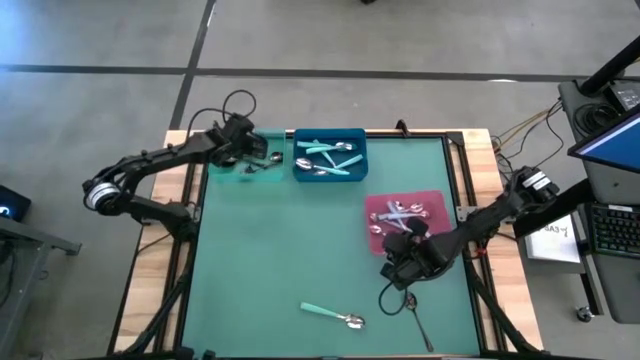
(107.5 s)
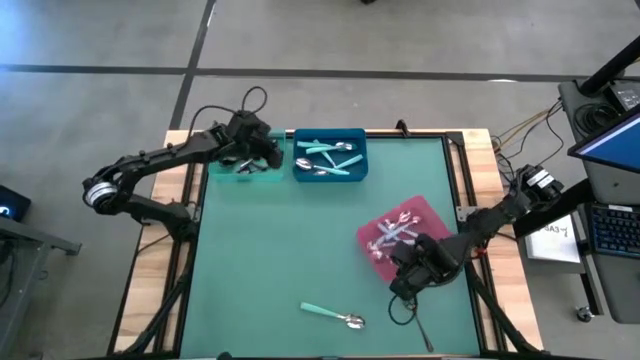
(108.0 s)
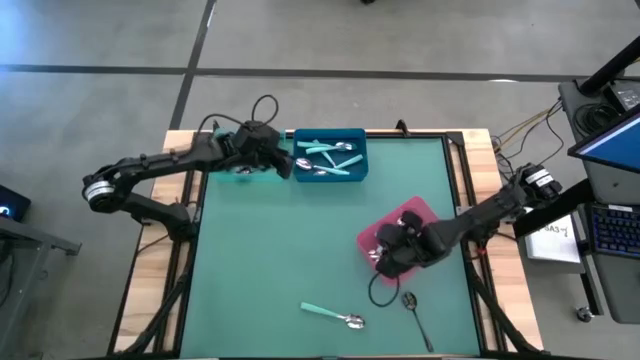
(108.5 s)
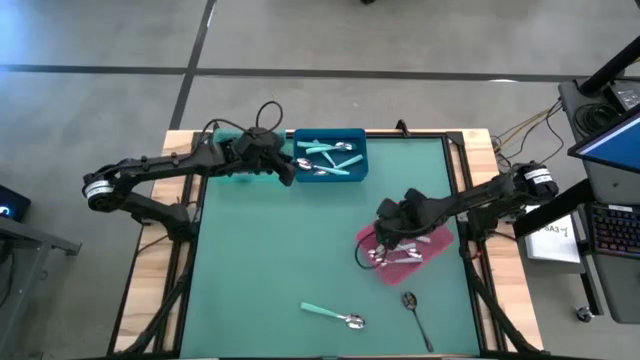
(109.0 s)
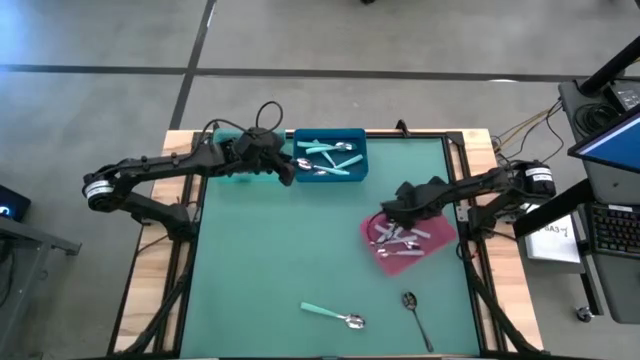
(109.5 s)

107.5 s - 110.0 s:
Task: Sort silverware by color (type)
Adjust the red bin

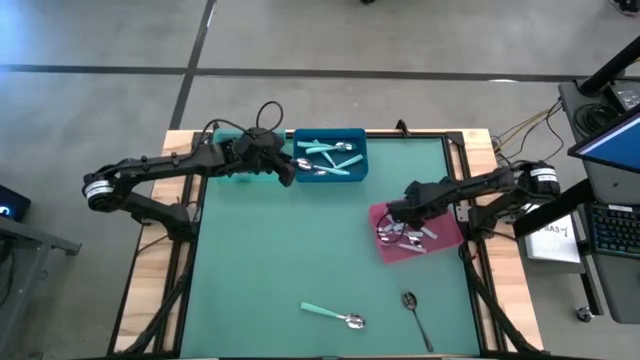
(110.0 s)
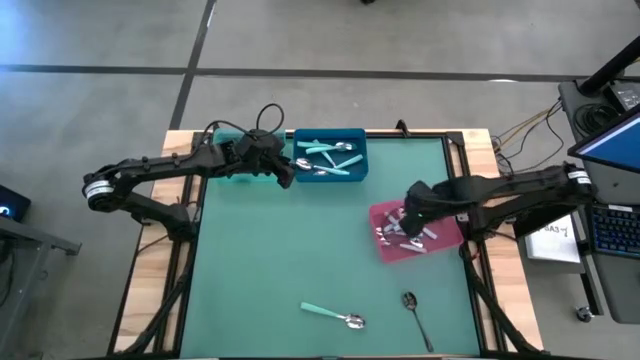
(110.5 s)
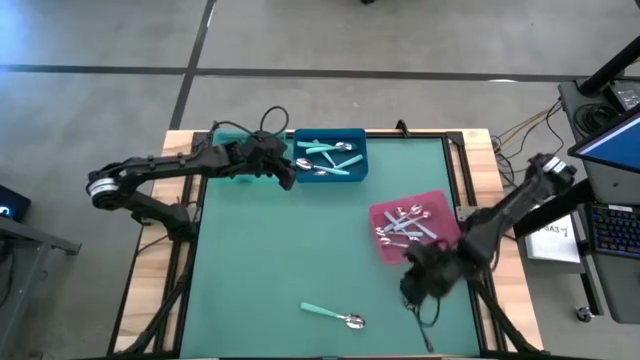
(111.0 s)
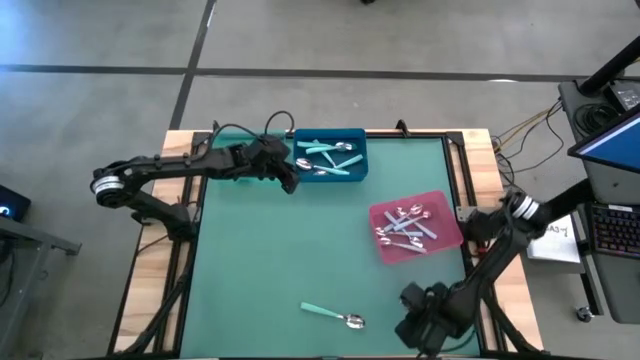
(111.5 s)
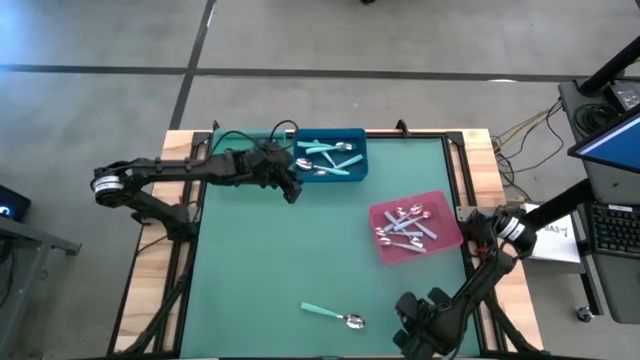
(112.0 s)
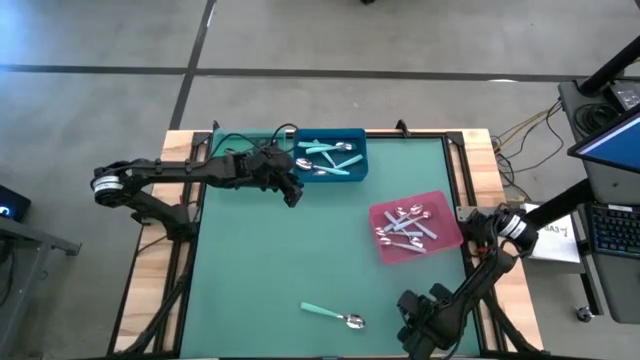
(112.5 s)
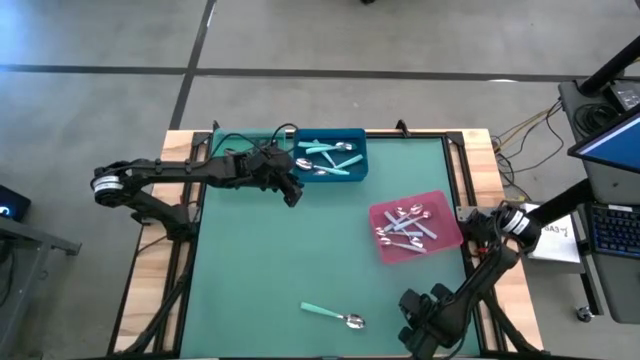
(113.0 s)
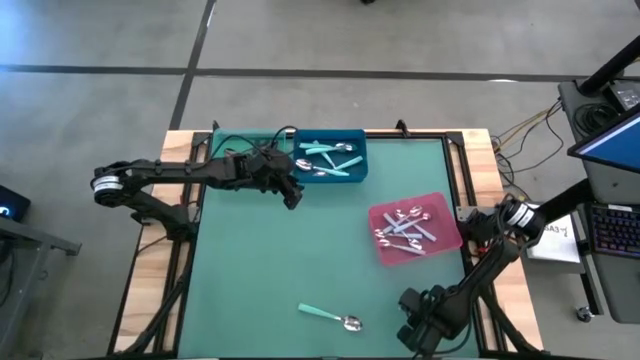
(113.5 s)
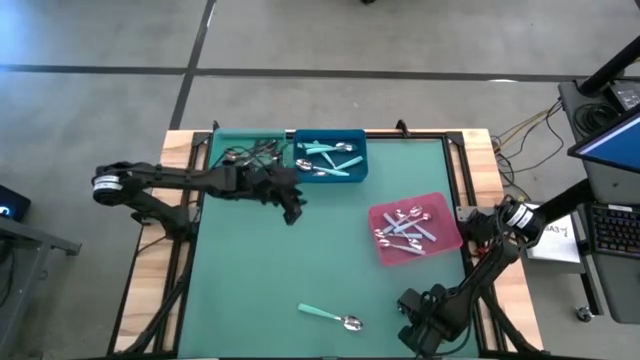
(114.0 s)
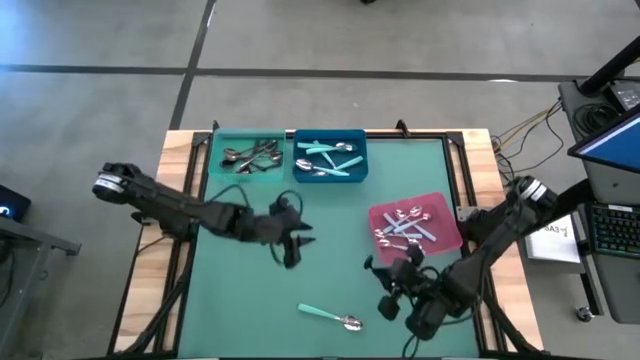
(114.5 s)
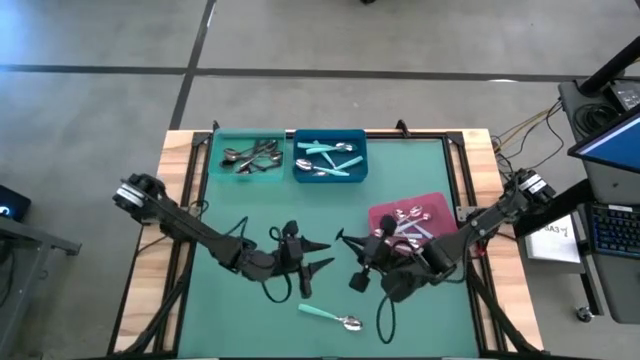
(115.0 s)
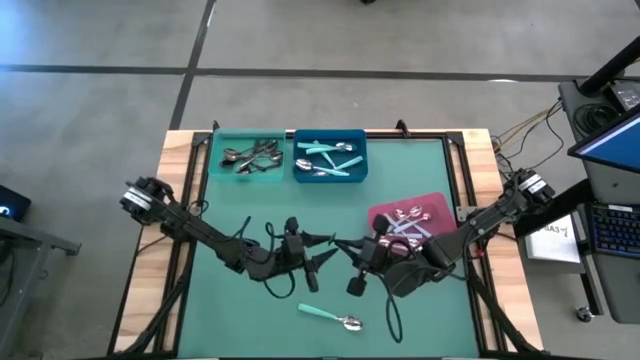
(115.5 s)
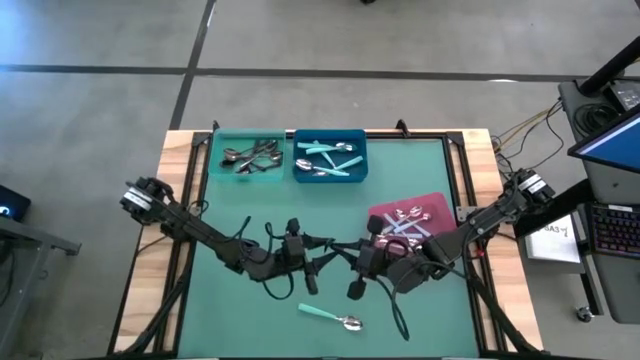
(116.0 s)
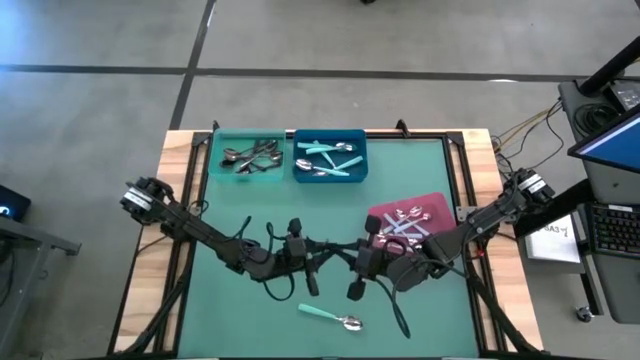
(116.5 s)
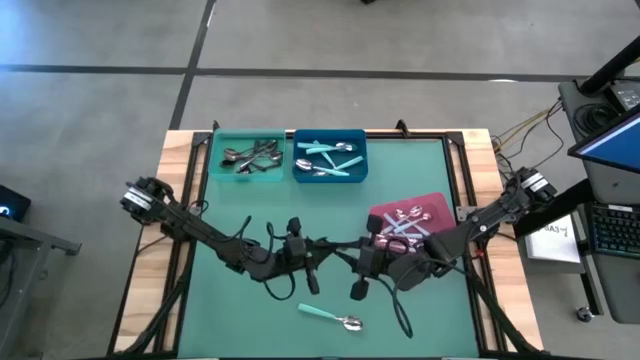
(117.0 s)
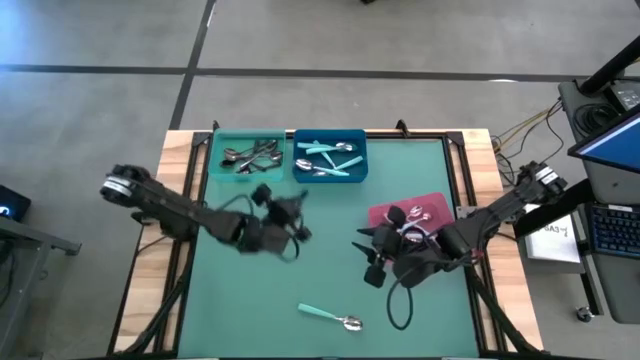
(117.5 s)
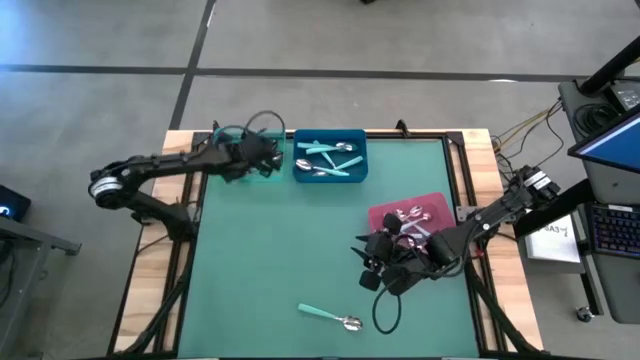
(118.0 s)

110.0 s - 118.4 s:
Put the black spoon into the green bin

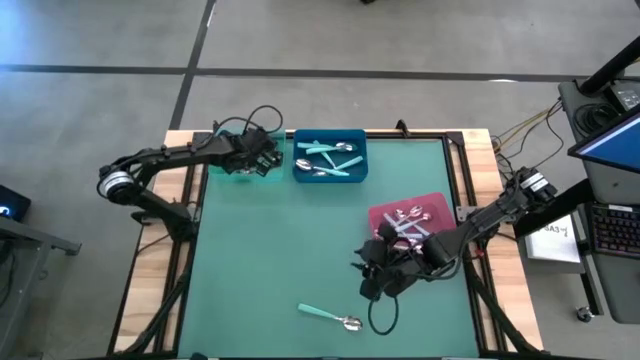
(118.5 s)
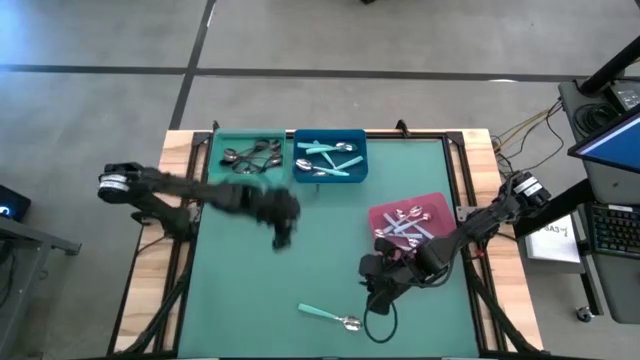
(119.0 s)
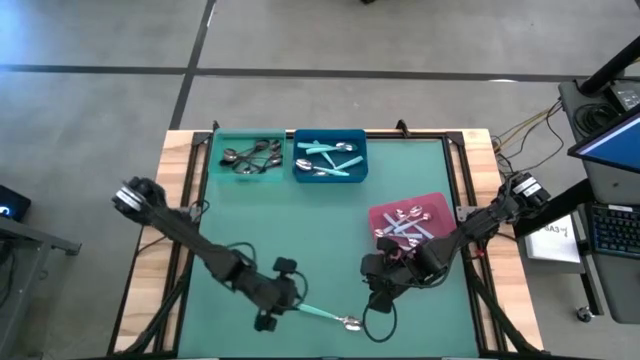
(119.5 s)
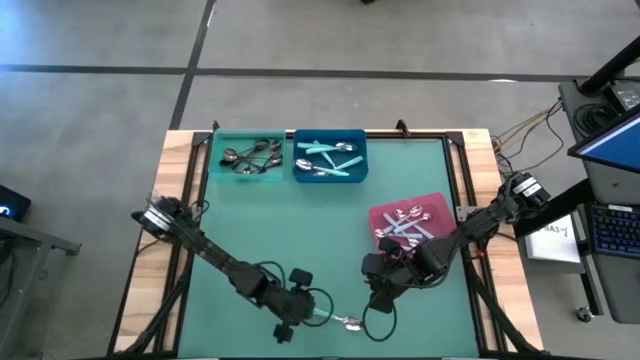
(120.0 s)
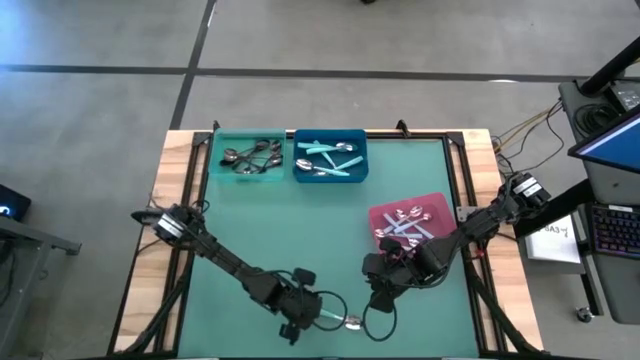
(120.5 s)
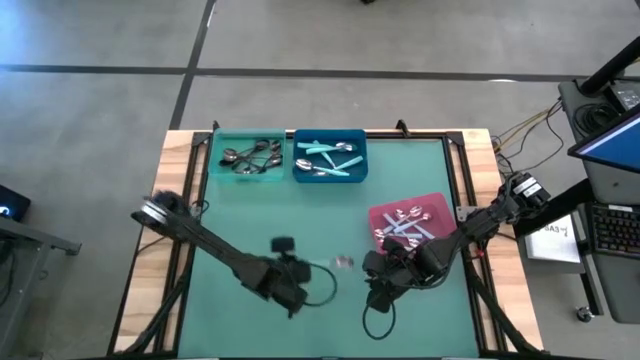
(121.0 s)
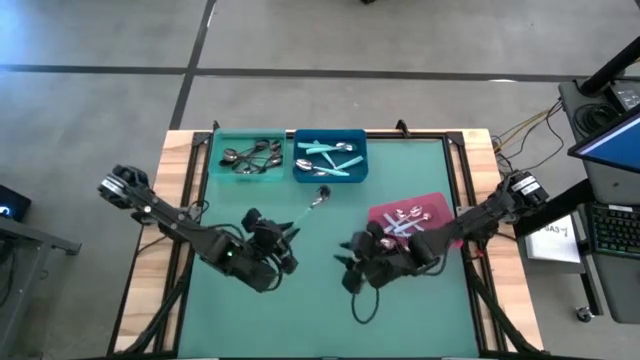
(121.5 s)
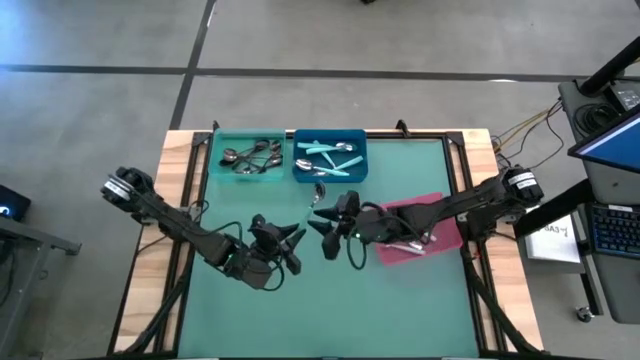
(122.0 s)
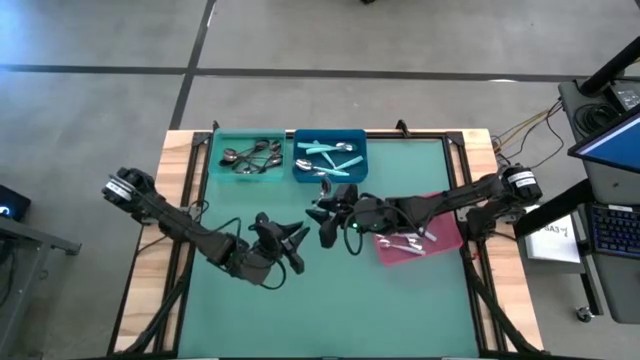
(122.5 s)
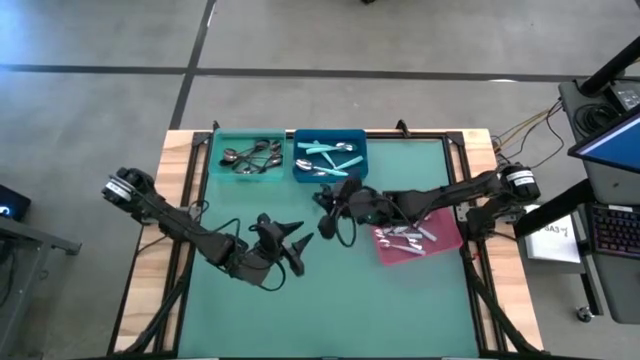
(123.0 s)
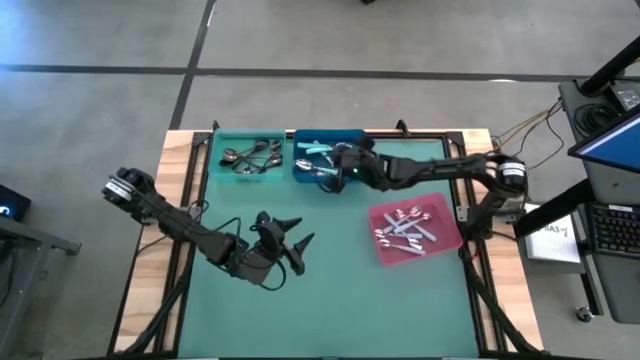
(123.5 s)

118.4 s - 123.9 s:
Put the green spoon into the blue bin
